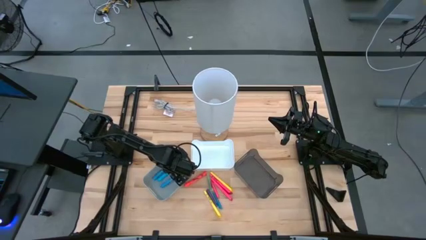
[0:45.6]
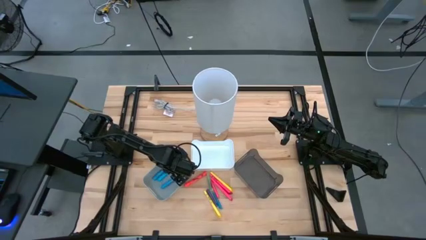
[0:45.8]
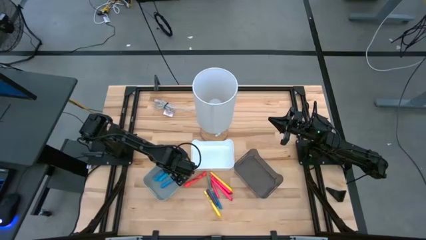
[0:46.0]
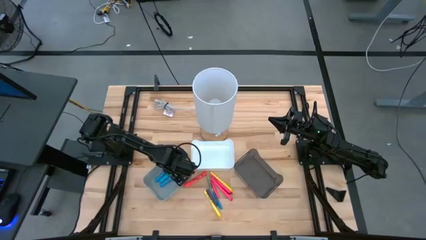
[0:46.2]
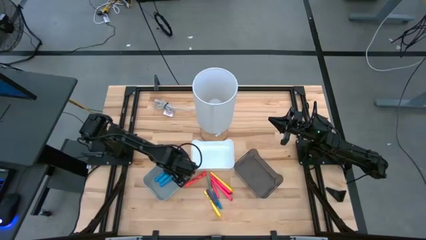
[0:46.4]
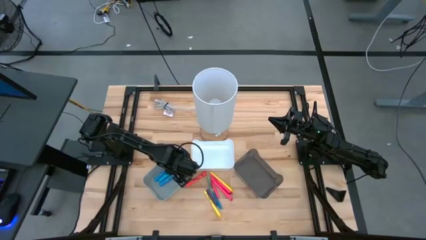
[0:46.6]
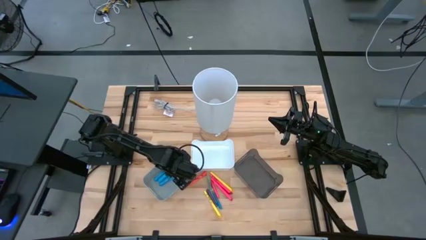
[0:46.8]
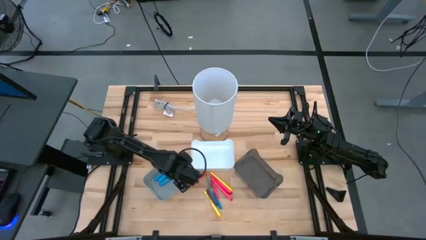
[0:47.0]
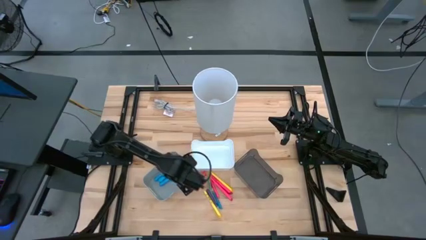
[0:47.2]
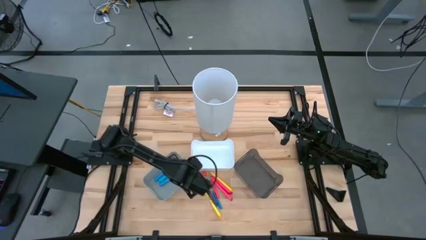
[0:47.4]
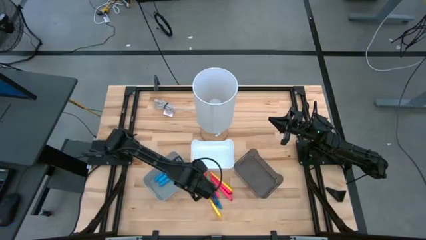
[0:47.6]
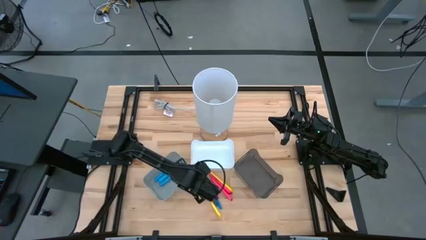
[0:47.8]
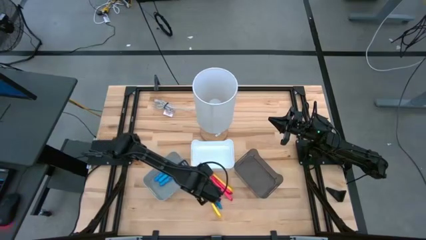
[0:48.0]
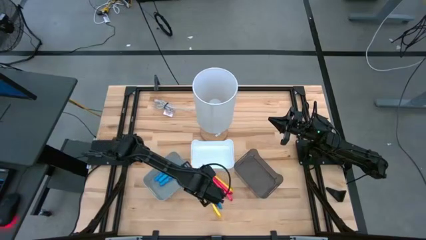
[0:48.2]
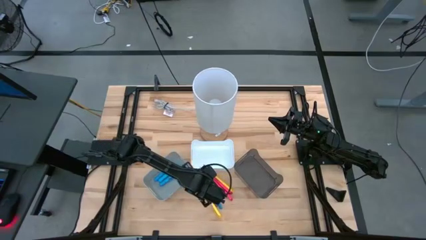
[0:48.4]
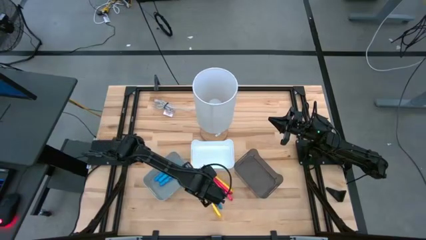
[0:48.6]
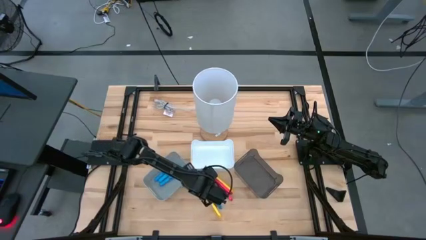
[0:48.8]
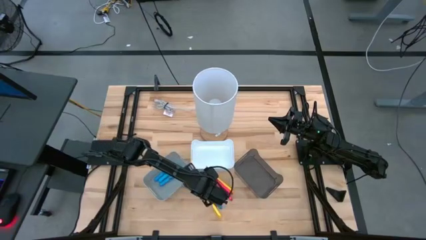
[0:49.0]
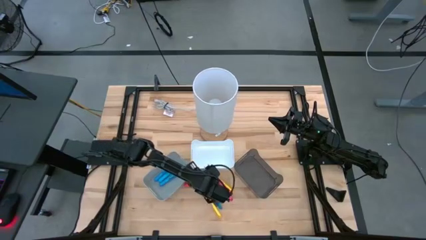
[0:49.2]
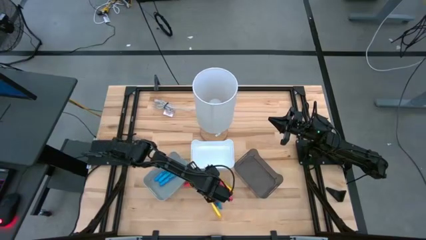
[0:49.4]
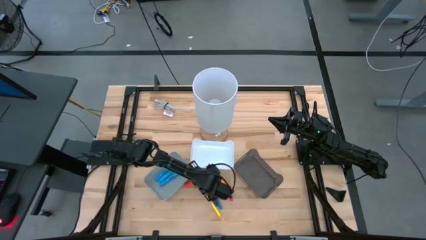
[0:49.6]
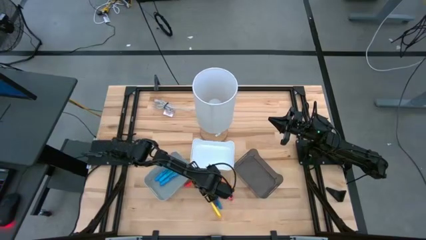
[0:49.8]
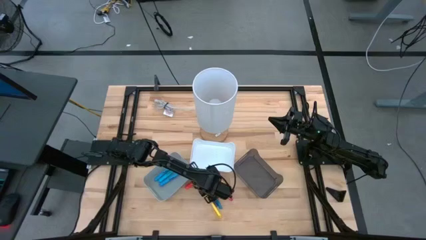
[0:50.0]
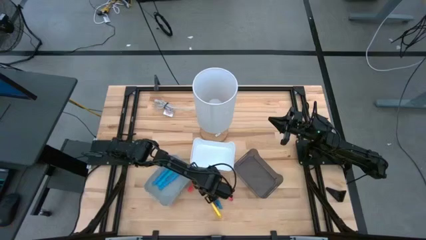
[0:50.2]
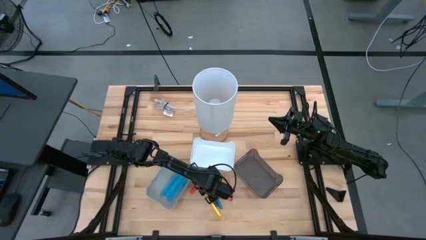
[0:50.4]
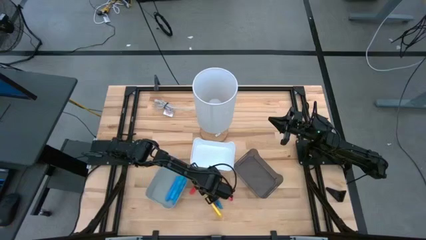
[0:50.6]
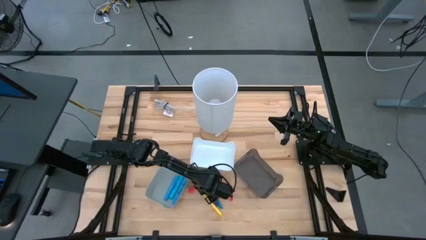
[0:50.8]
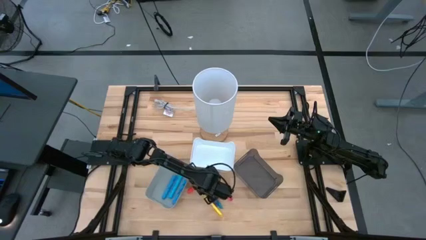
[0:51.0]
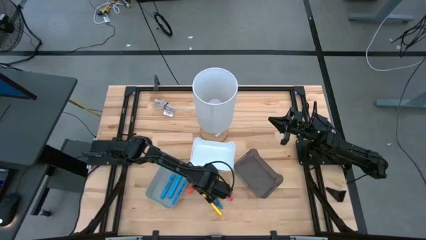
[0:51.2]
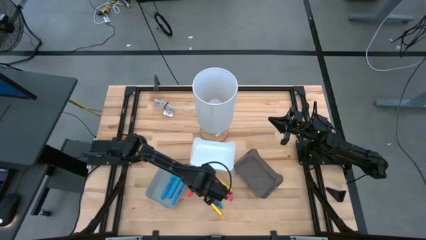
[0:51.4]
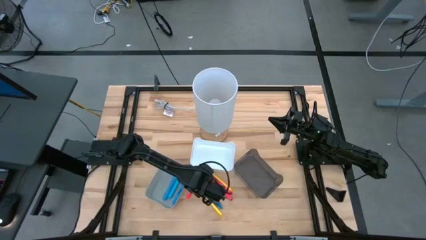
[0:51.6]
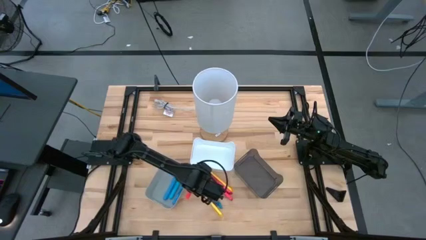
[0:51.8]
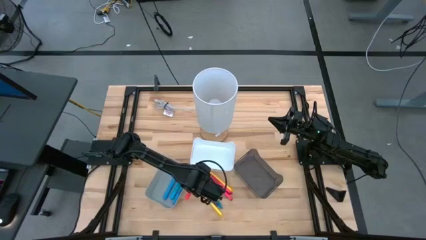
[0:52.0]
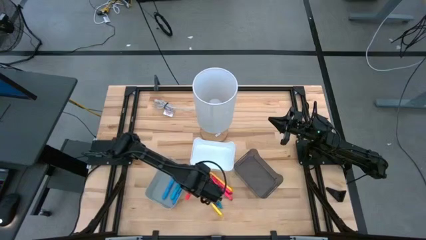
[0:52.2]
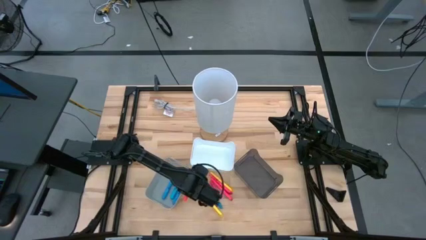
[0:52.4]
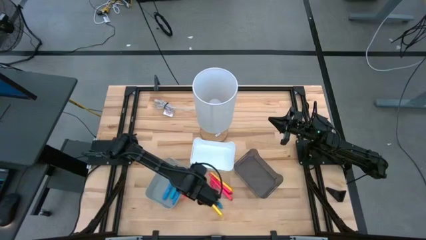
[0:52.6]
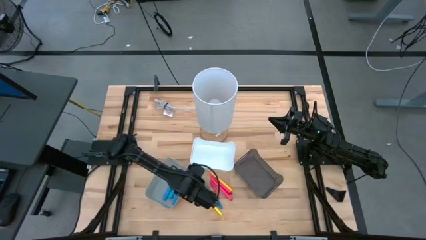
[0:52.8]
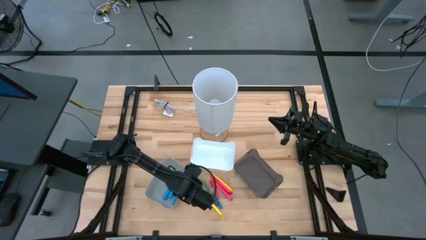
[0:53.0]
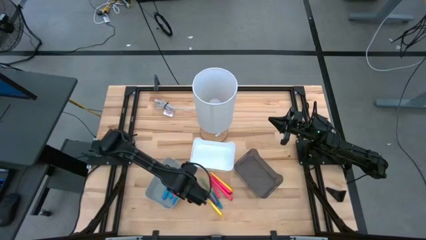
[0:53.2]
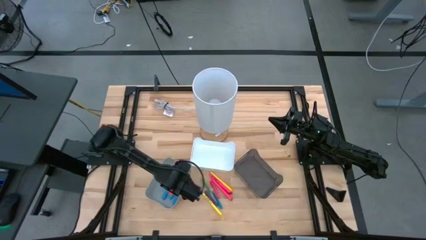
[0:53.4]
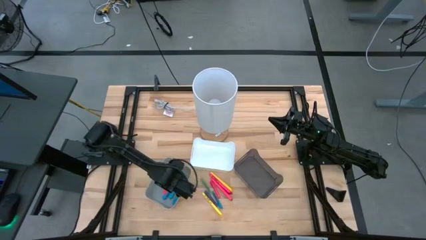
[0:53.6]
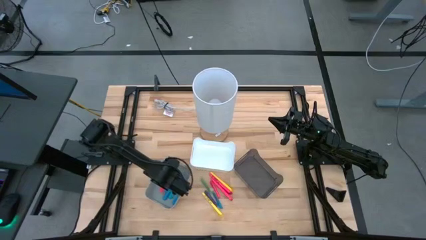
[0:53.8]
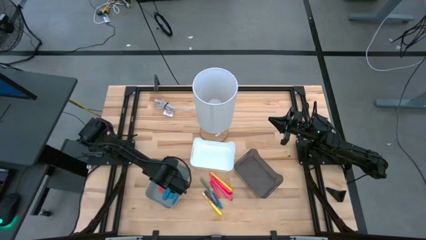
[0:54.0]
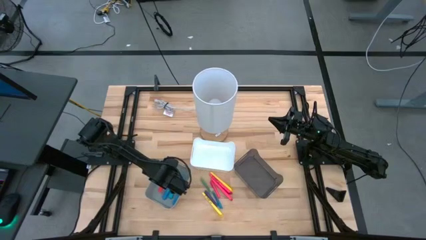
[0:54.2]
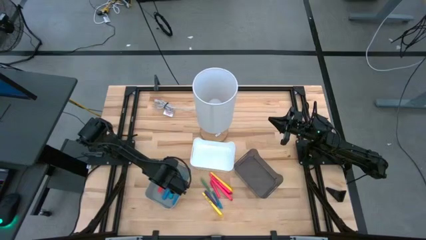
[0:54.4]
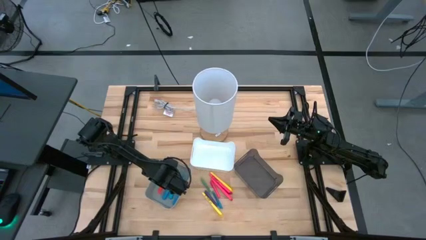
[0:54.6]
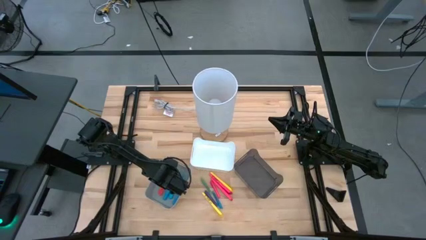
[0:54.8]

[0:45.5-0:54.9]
Task: Pick & Place Markers
Put the red highlighter pen in the gray bin

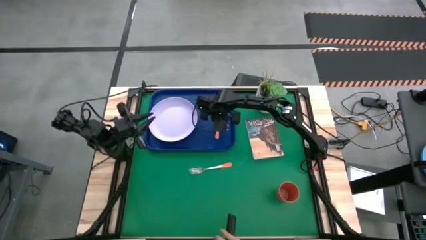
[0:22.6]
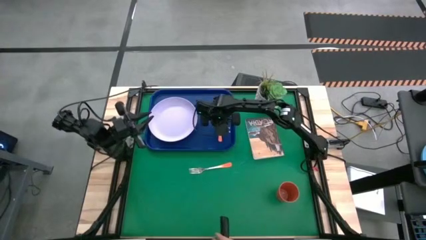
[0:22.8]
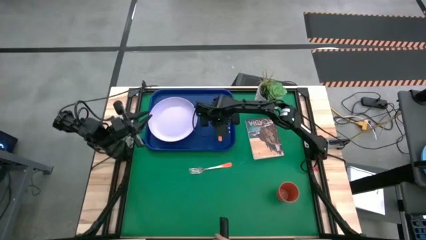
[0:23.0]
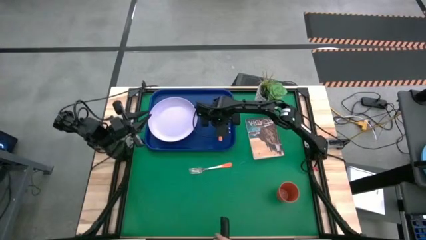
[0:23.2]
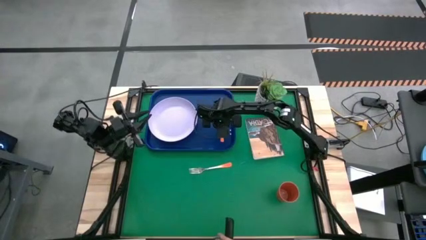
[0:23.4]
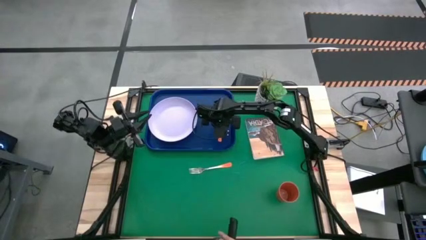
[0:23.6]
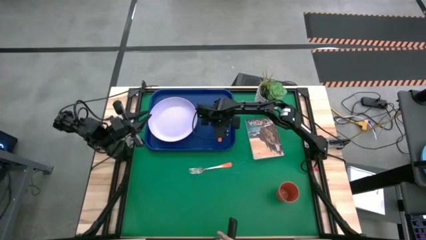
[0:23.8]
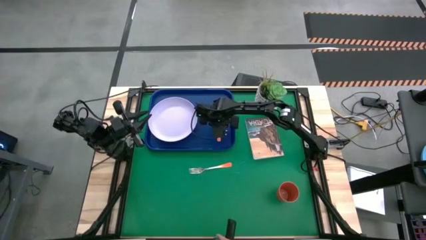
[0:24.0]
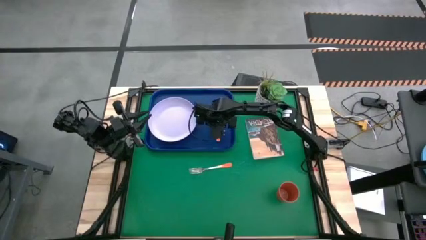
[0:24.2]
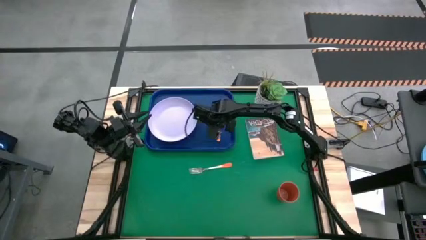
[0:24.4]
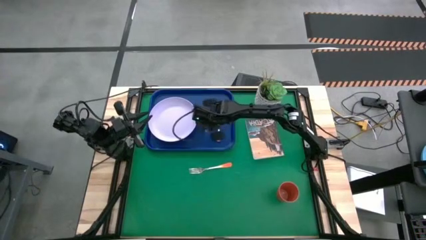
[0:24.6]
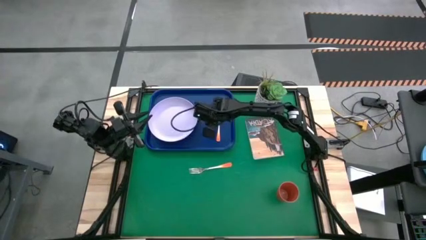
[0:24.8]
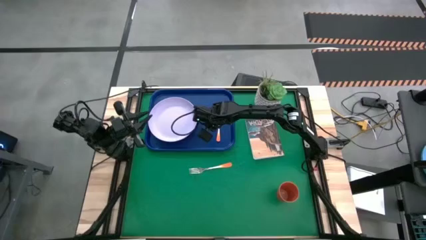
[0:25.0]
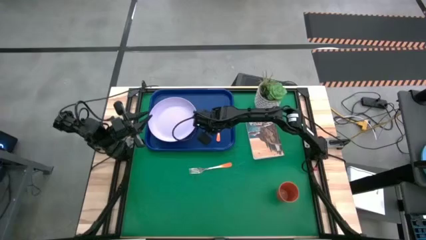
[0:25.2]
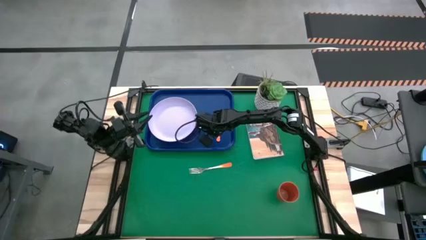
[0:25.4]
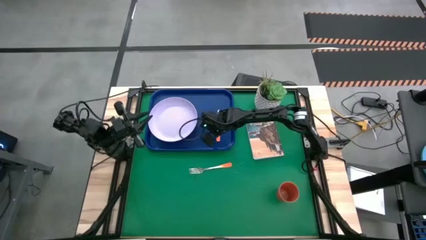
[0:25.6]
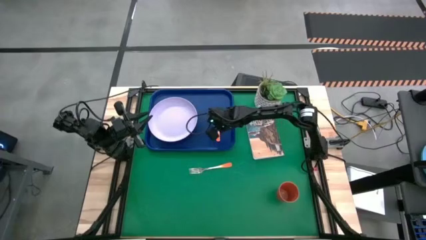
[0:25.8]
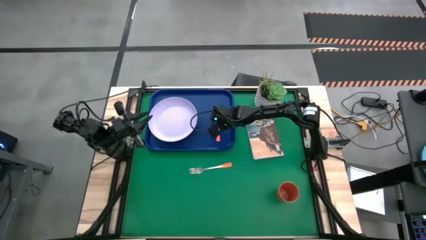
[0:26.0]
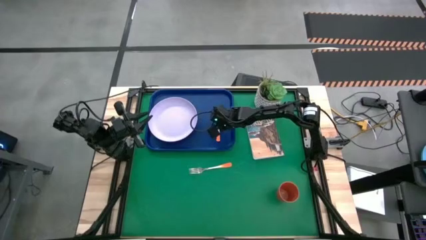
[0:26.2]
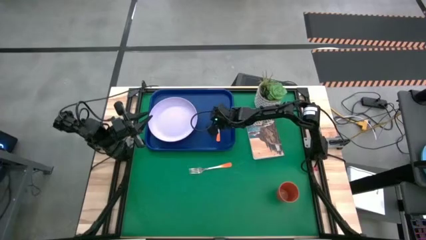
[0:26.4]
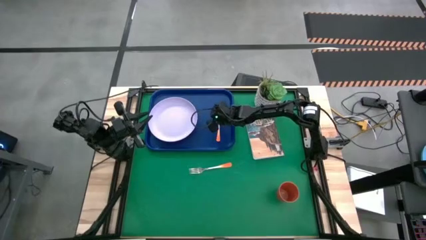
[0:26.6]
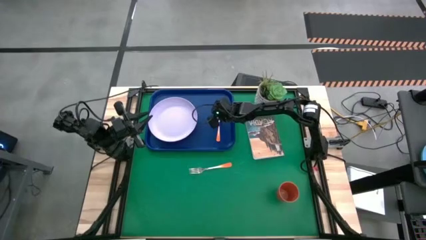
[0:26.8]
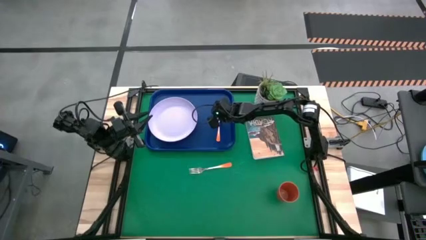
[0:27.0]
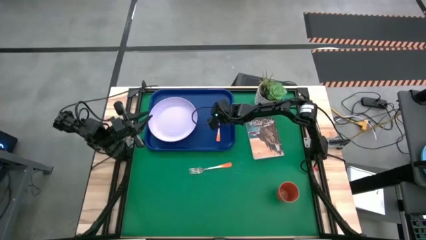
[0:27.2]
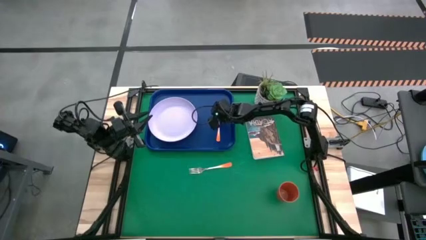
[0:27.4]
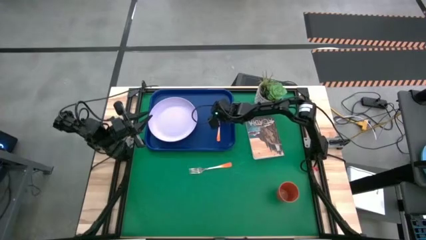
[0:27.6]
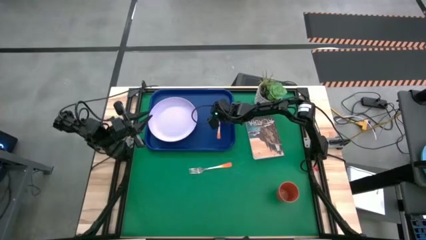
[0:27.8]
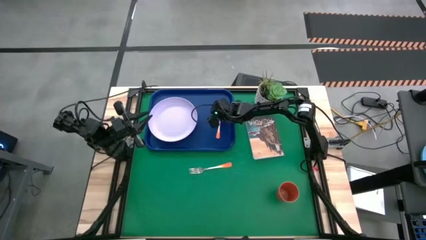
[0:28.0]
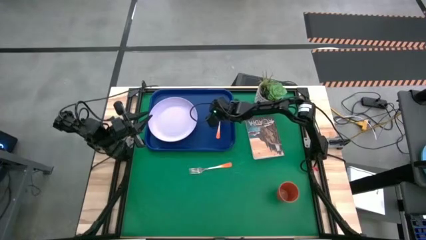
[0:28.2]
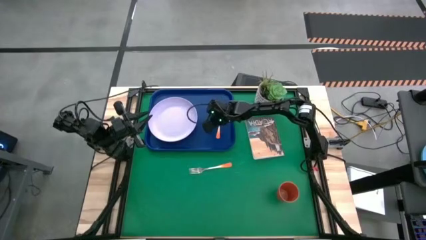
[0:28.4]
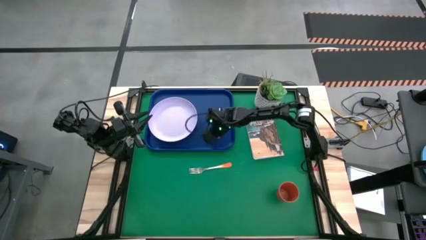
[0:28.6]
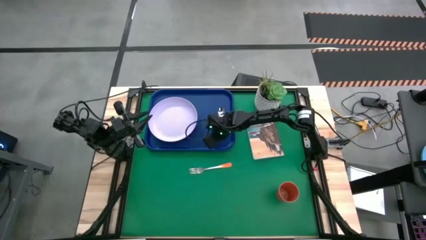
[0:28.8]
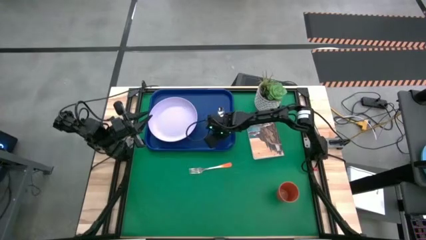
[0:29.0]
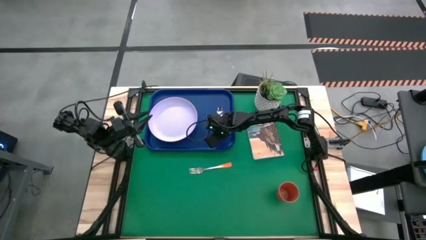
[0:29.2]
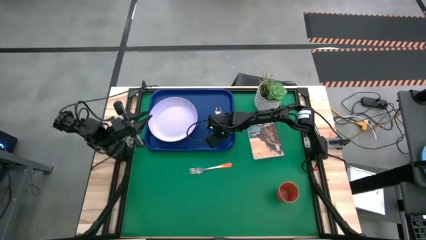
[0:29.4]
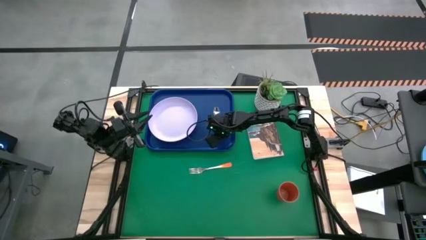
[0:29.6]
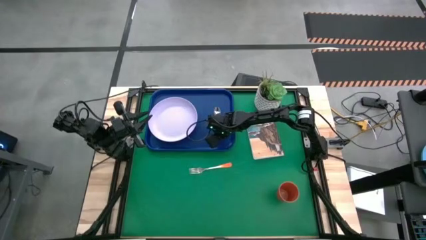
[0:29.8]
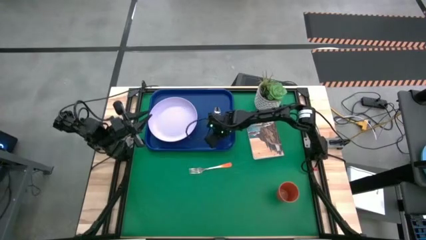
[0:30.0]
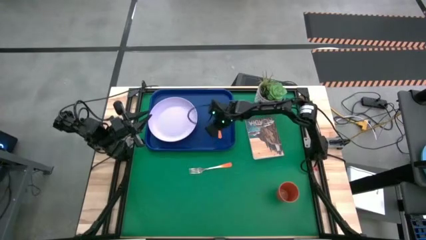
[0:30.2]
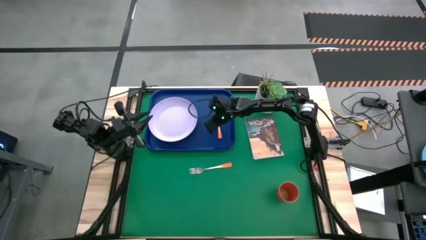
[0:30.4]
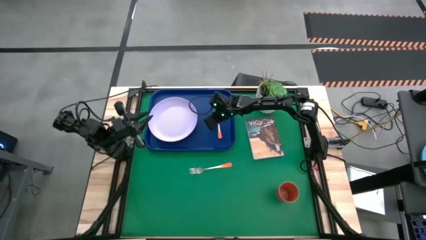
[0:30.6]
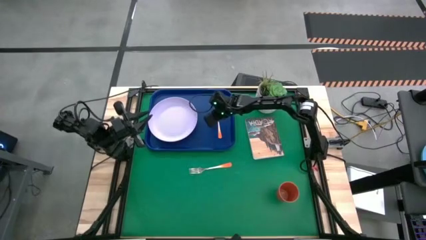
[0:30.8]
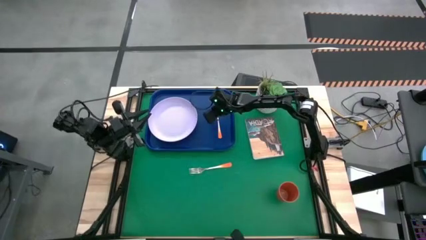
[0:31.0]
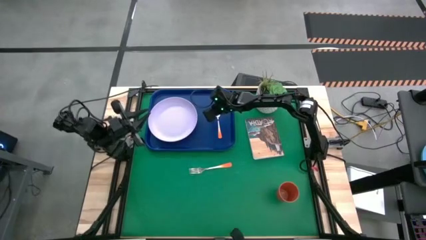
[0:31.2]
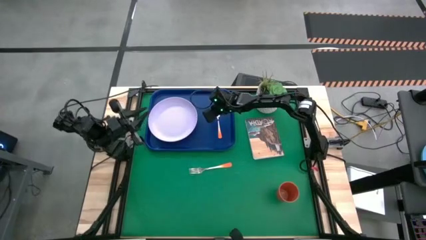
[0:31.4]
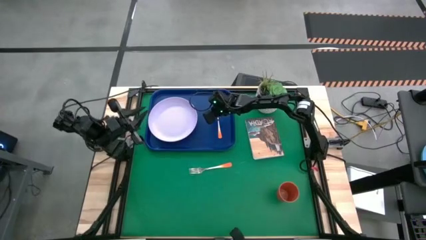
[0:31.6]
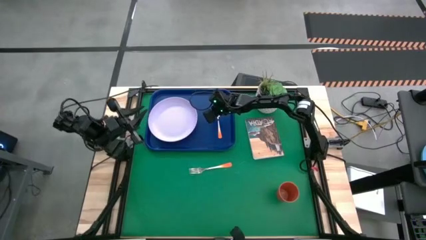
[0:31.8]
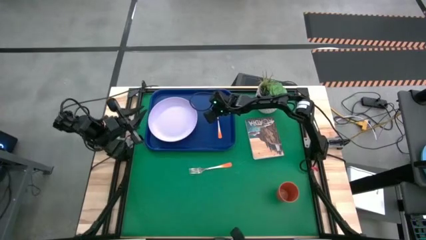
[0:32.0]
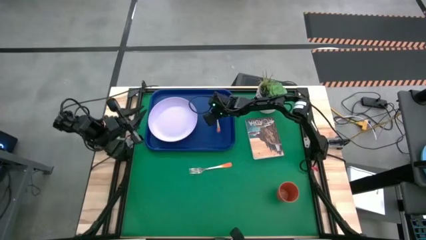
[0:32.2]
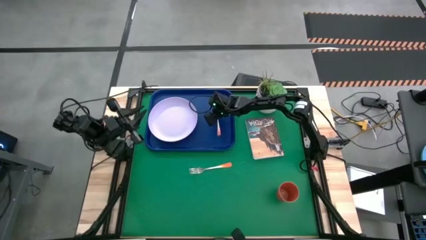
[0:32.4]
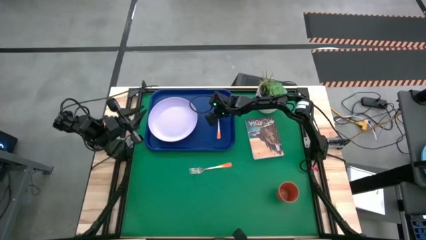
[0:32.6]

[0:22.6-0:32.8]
Task: Pick and place plate/cup/fork/spoon on tray
Put the orange spoon on the blue serving tray to the right of the white plate
